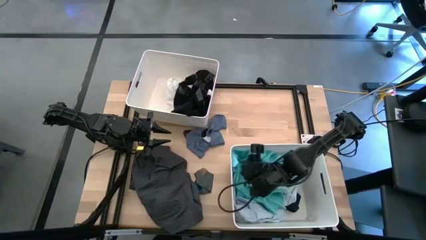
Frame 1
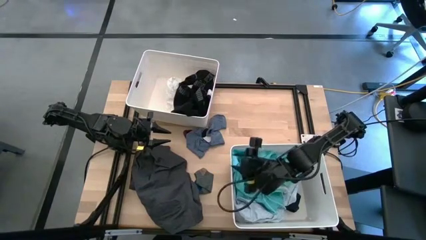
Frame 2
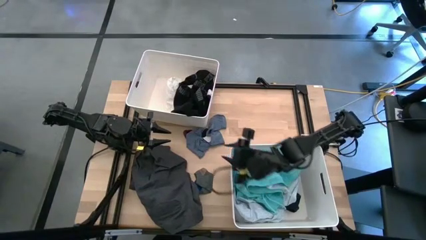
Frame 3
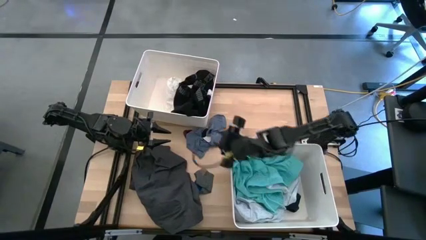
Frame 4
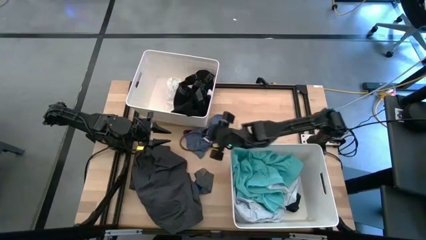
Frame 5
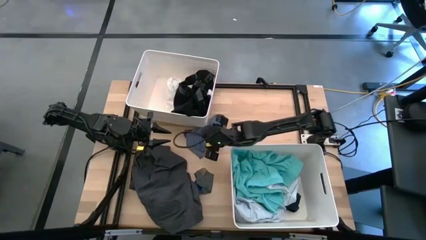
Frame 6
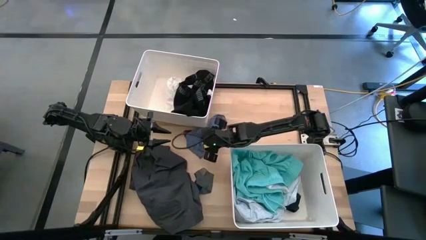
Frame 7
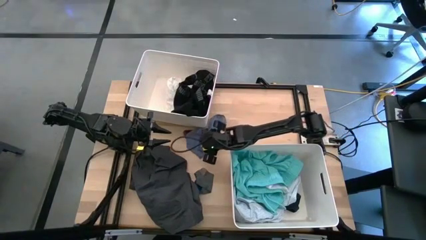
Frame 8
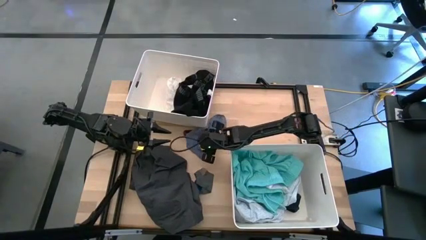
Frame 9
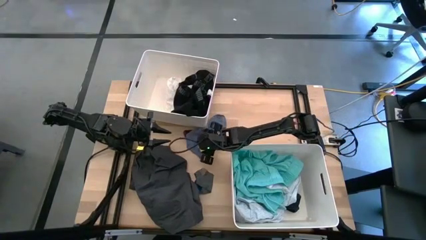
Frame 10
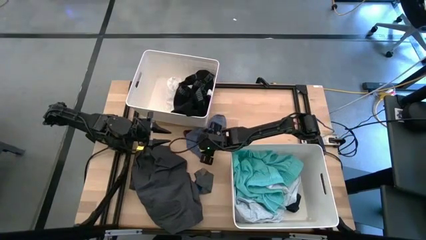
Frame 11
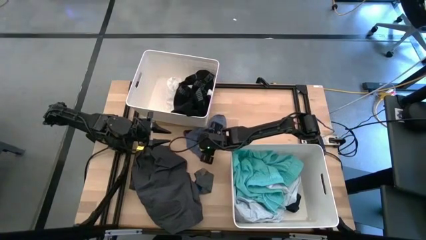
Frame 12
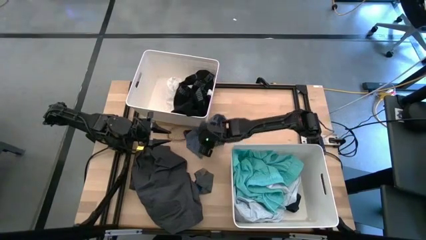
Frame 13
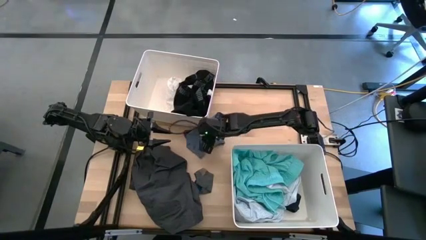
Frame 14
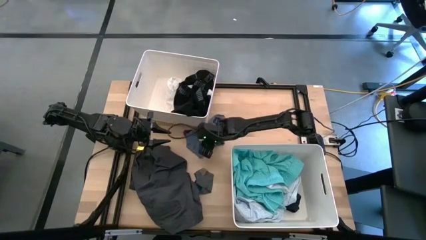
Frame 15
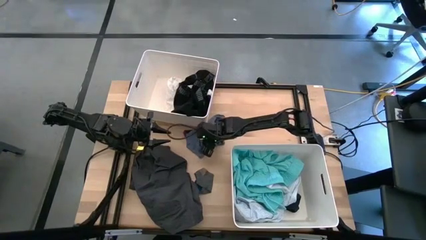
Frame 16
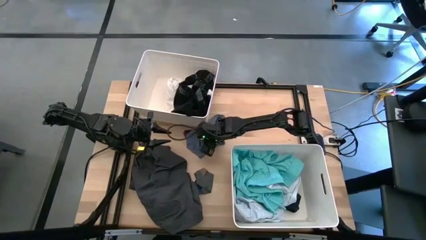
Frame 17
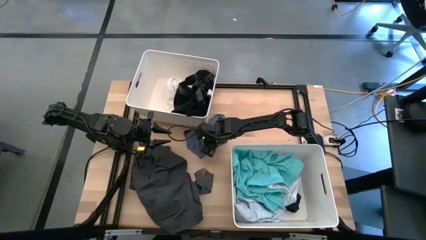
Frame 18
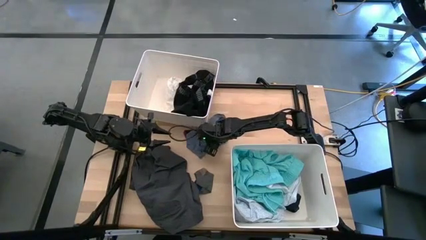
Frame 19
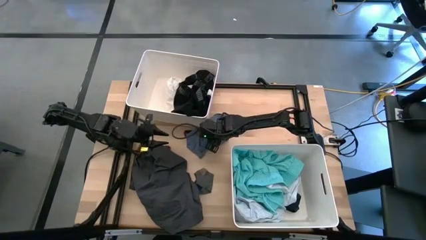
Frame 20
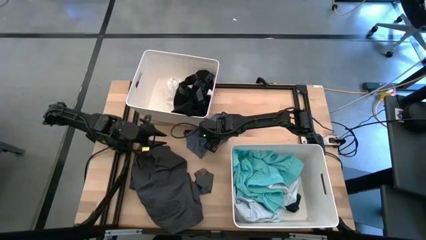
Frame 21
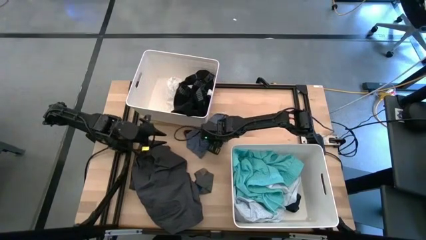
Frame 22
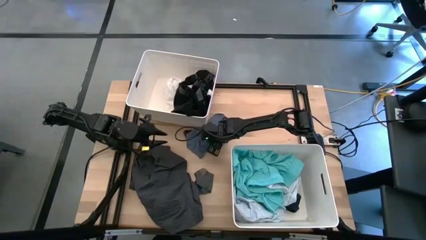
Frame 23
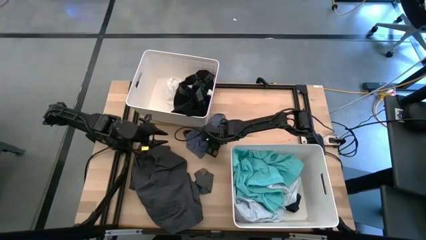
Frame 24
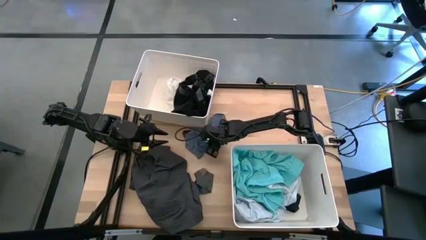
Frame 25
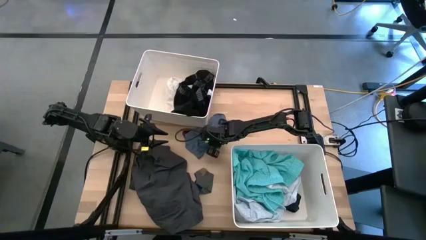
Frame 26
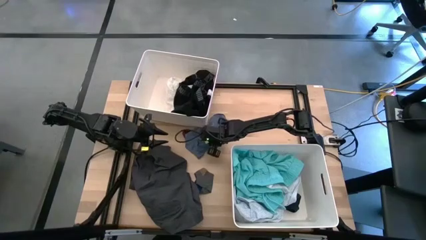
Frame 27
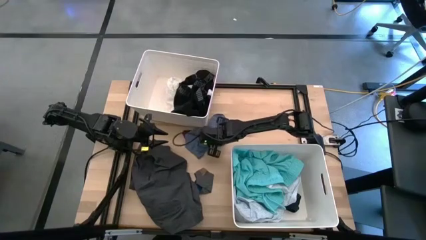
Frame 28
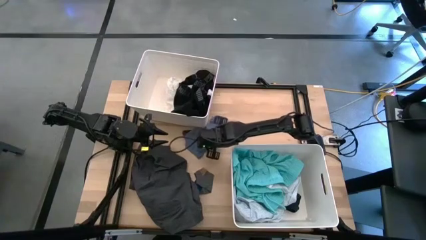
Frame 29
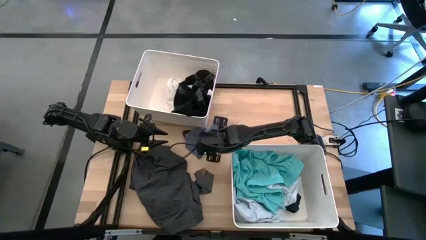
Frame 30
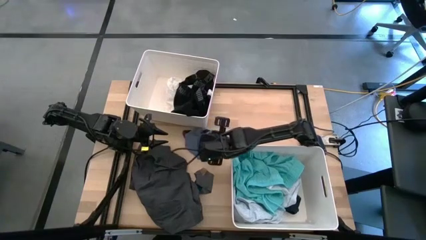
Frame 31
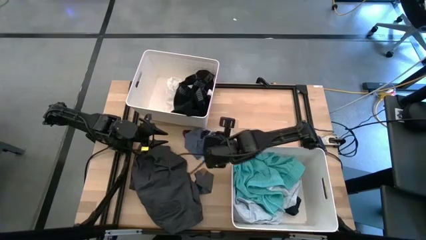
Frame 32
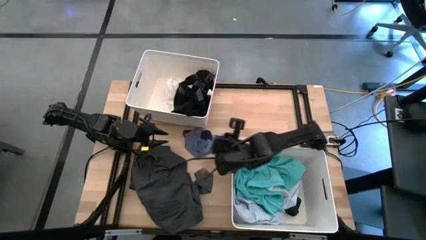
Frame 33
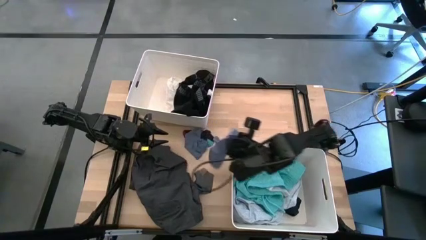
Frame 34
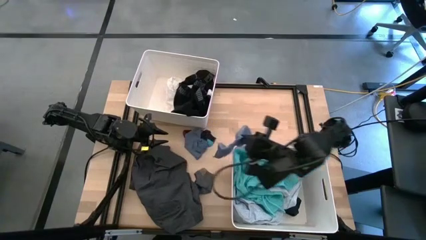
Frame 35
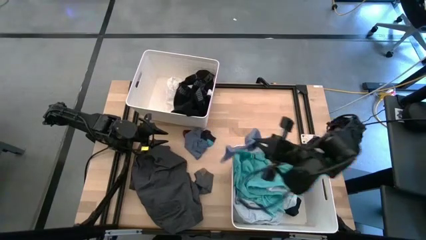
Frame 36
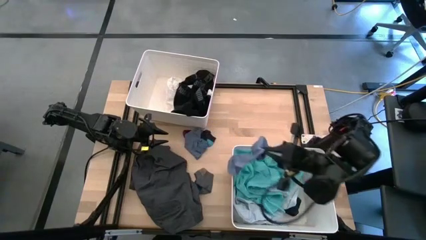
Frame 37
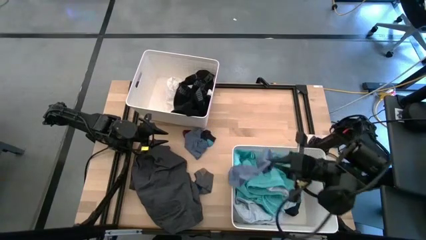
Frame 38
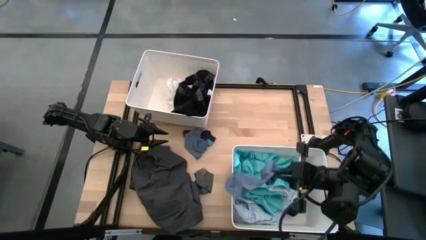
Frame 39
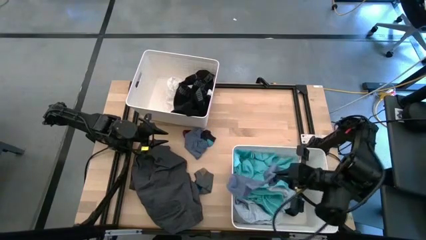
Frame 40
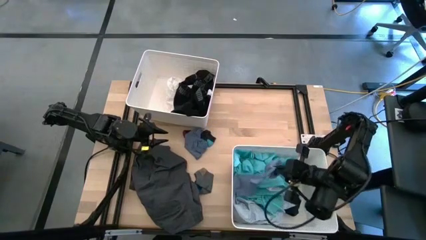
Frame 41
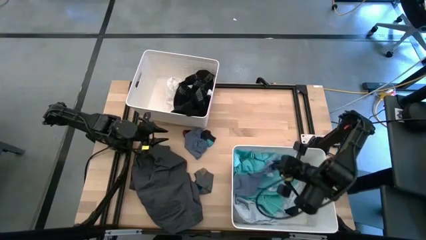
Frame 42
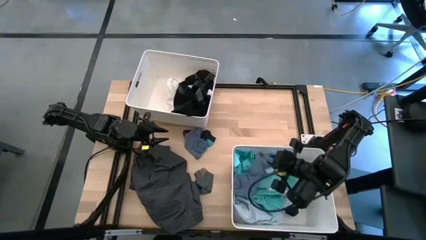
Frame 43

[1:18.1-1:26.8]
Task: Sort clothes
Put the blue sock into the bottom white bin

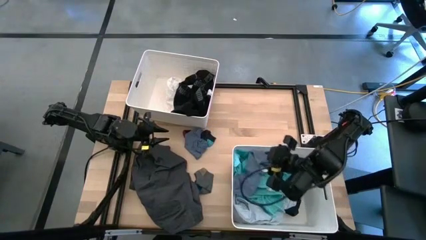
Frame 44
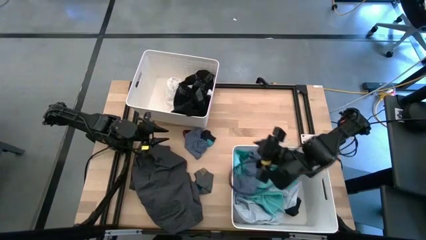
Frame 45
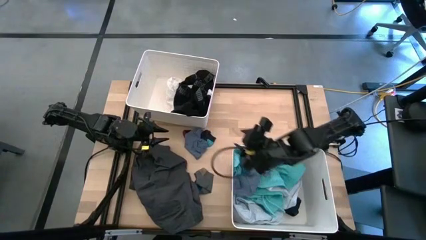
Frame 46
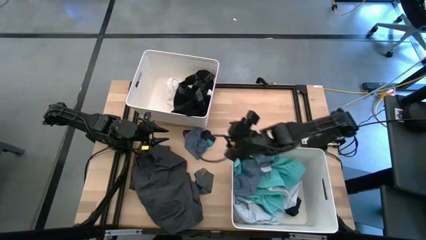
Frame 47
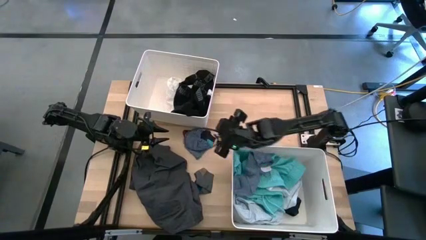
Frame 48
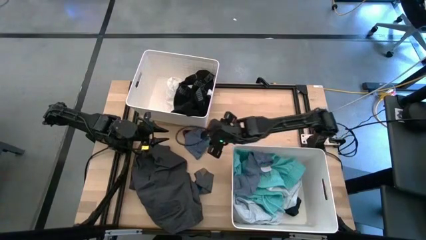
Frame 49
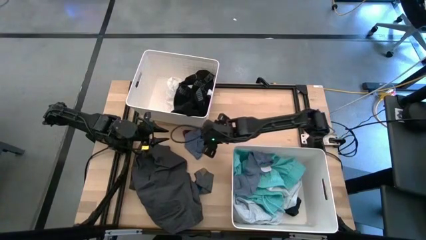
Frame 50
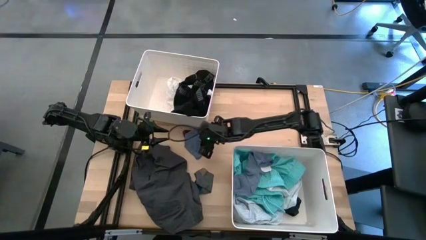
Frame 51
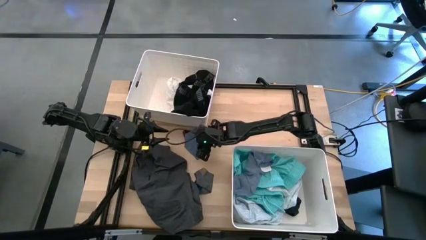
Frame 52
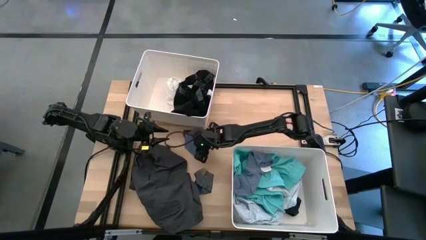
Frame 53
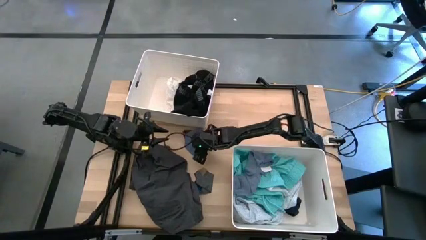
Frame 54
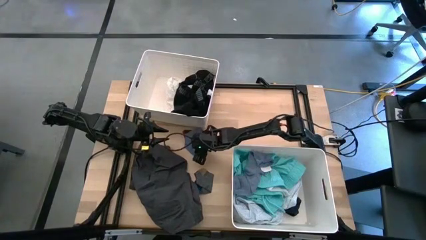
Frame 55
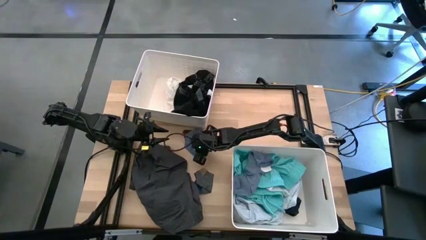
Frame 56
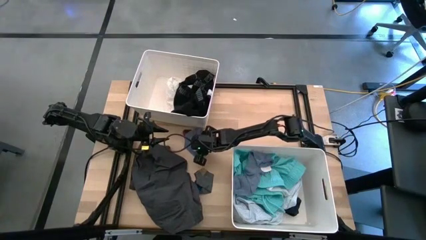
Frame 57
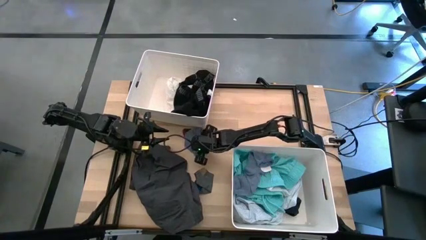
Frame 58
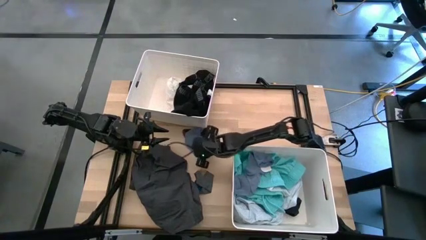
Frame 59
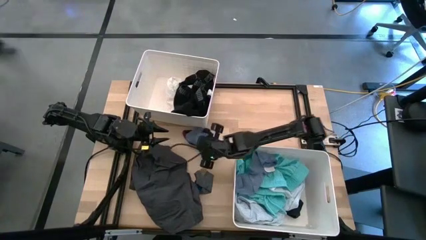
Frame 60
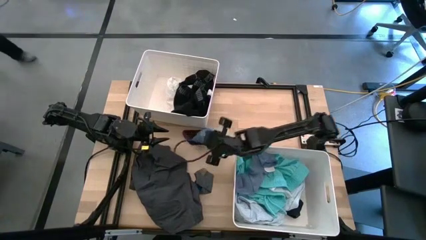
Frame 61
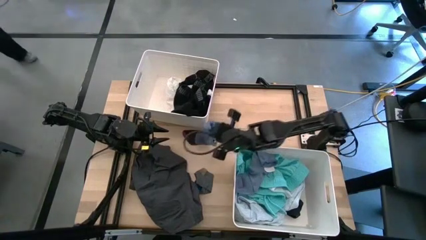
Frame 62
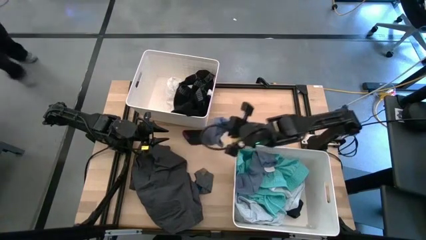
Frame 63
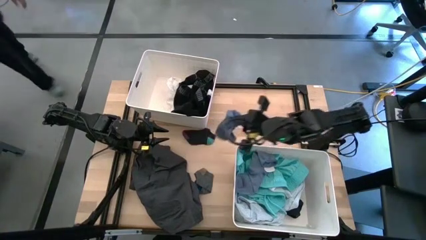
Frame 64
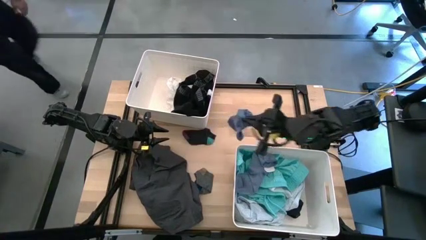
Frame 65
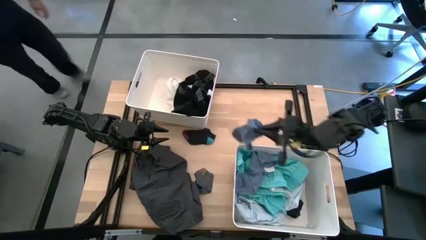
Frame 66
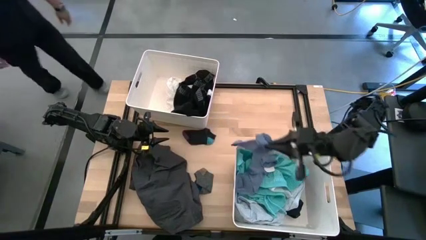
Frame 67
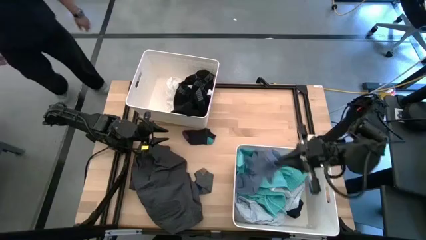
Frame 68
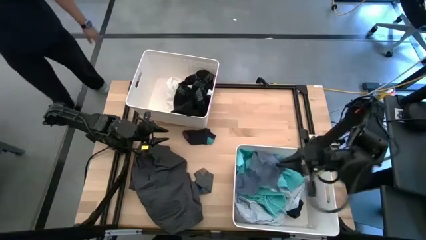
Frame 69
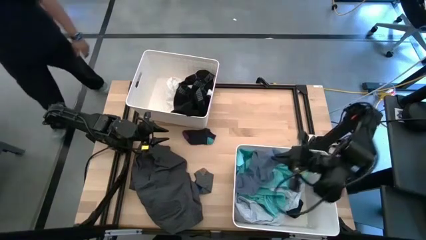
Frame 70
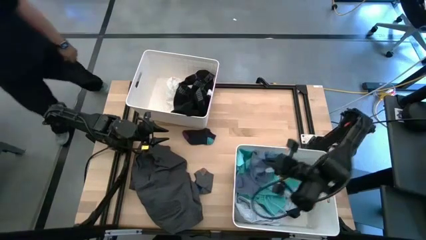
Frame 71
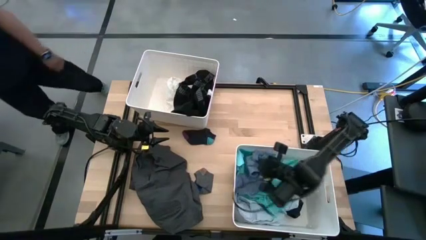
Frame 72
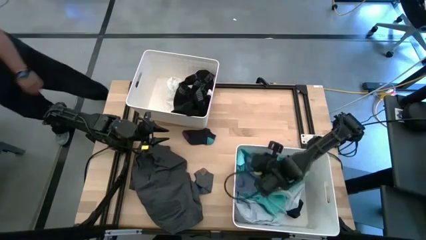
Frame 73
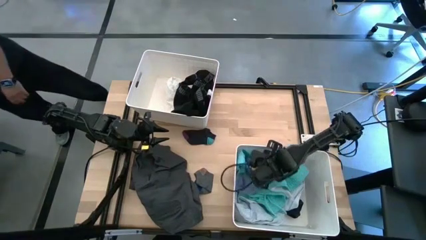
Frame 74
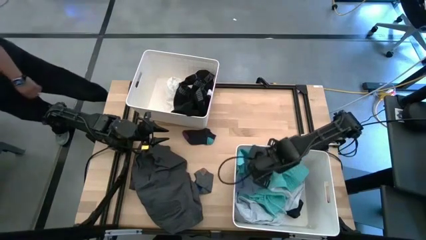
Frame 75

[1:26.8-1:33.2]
Put the blue sock into the bottom white bin
